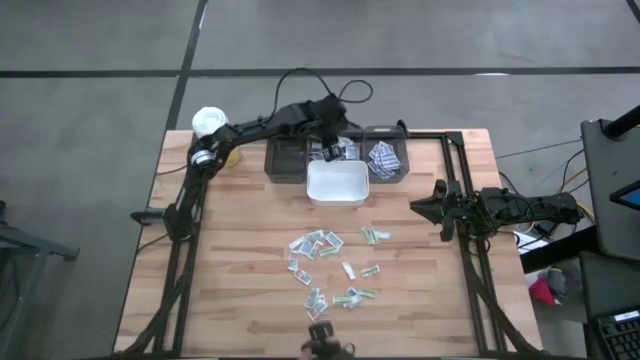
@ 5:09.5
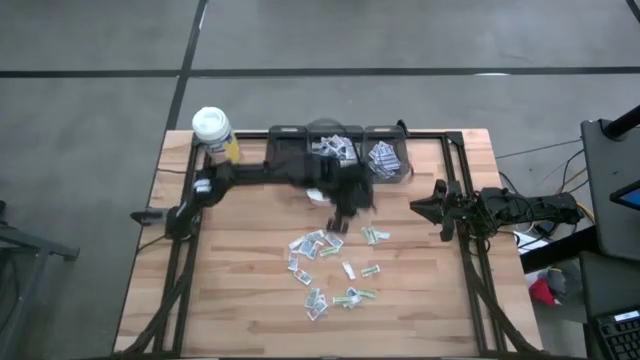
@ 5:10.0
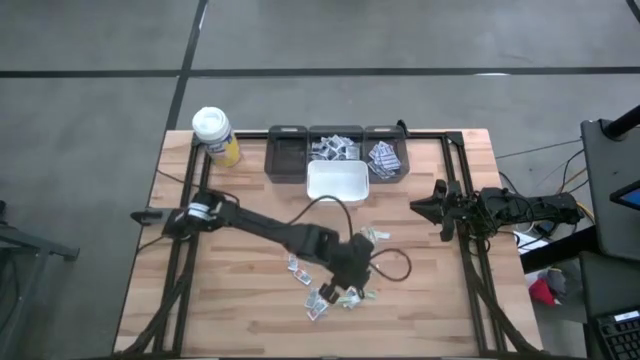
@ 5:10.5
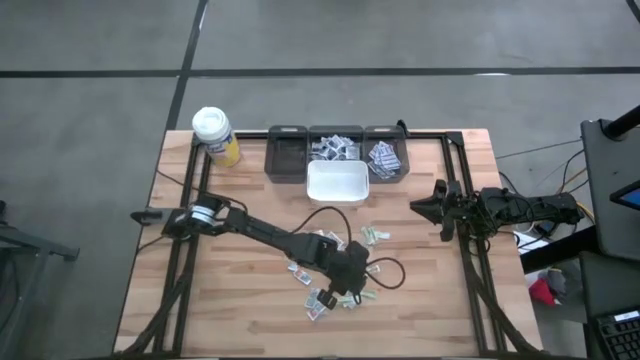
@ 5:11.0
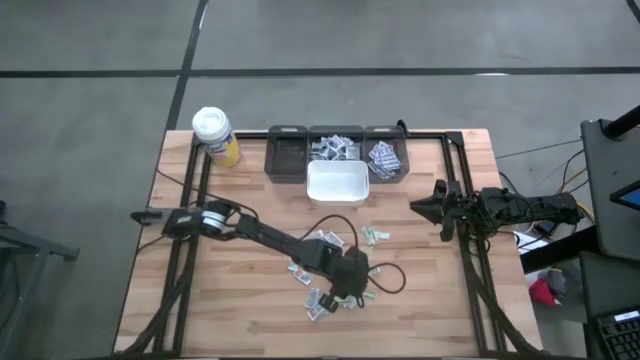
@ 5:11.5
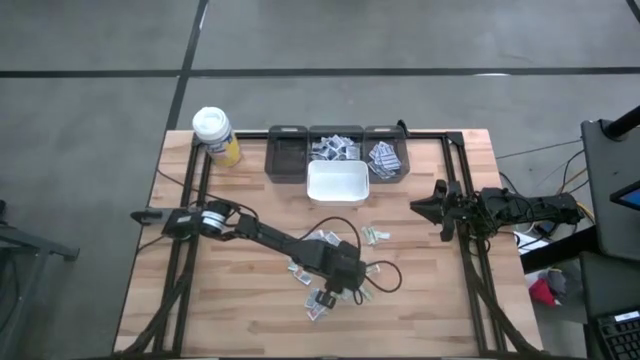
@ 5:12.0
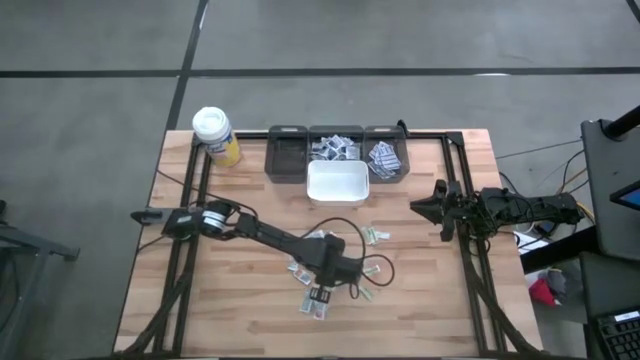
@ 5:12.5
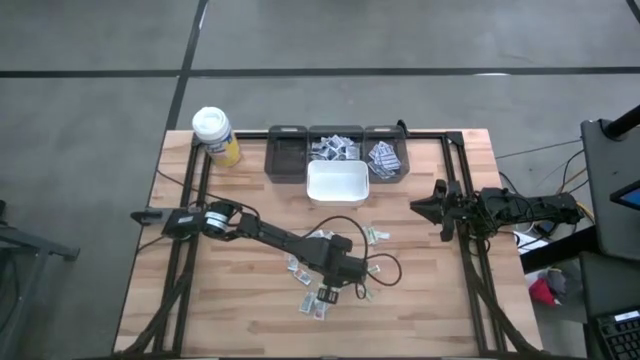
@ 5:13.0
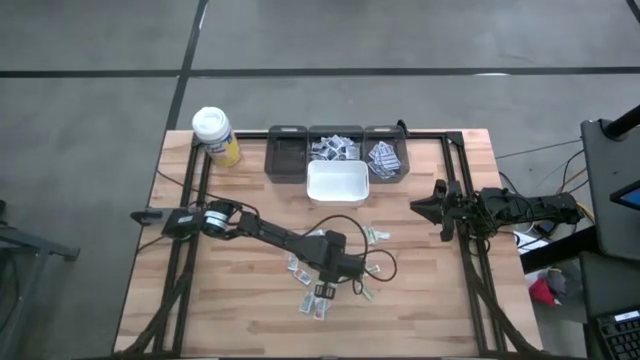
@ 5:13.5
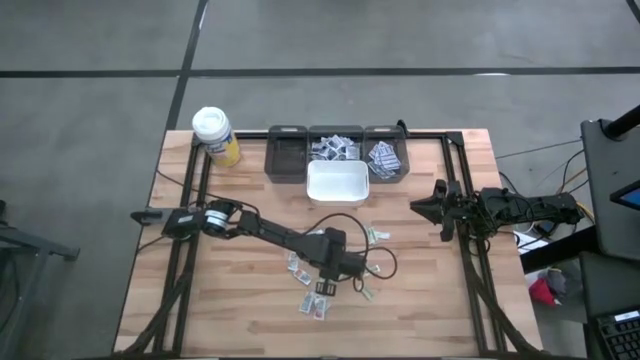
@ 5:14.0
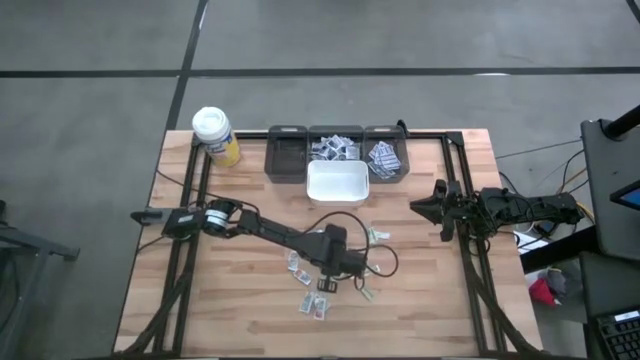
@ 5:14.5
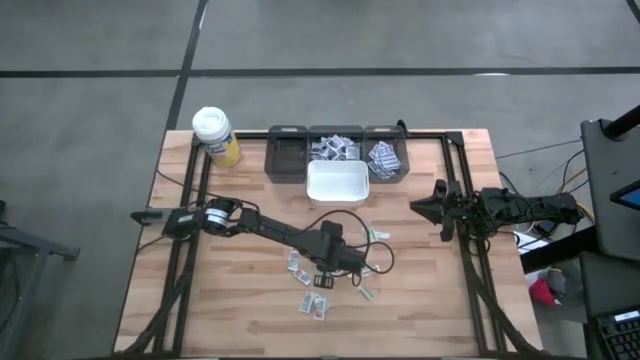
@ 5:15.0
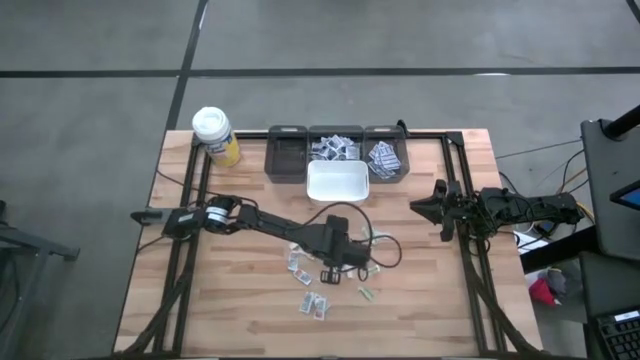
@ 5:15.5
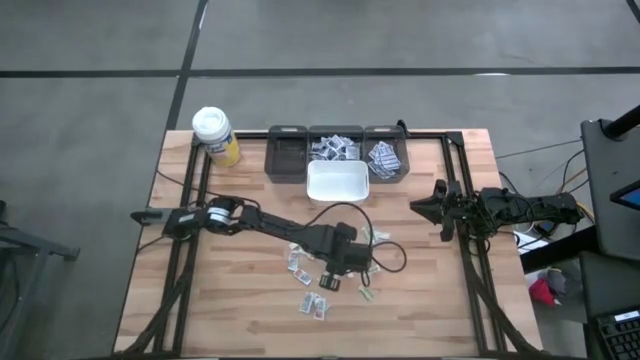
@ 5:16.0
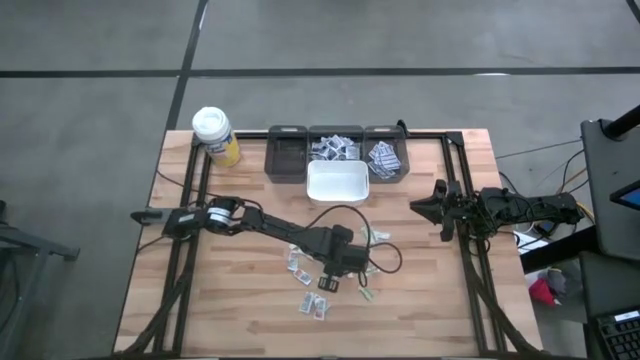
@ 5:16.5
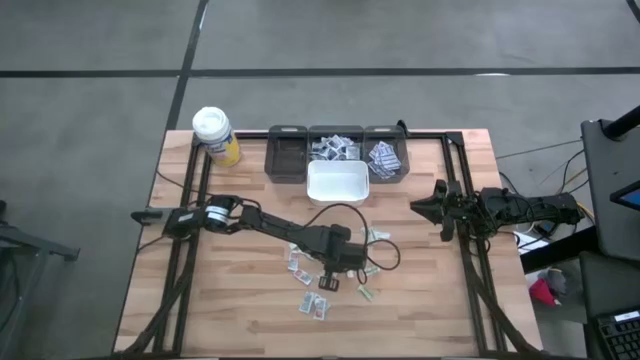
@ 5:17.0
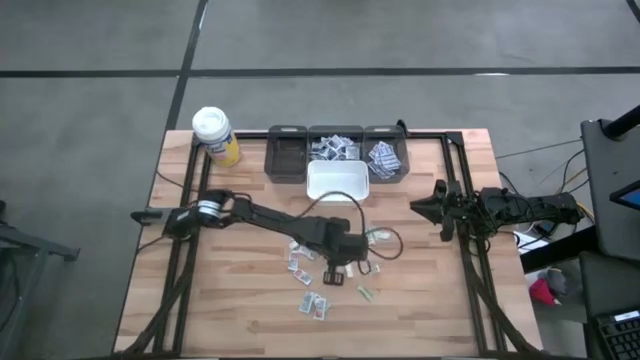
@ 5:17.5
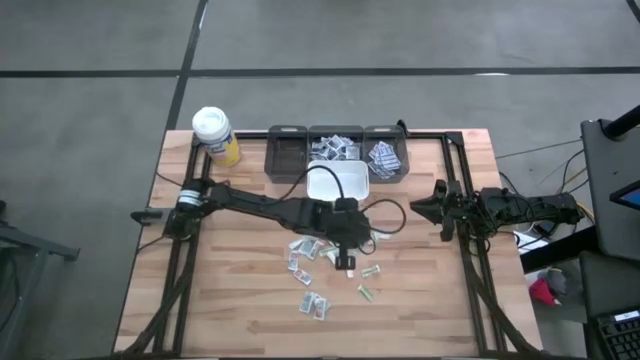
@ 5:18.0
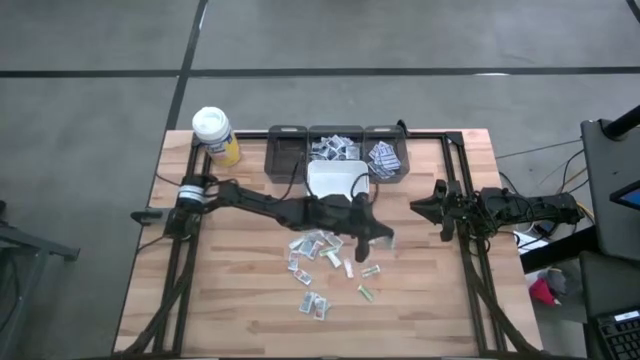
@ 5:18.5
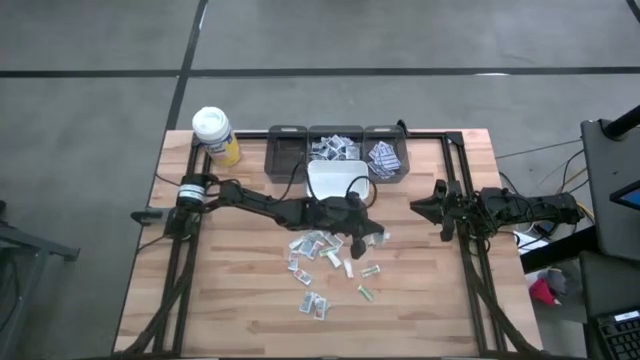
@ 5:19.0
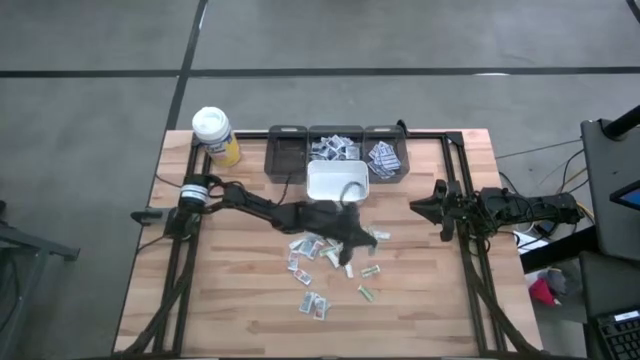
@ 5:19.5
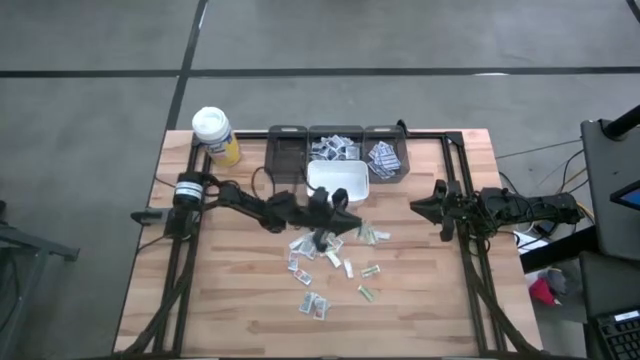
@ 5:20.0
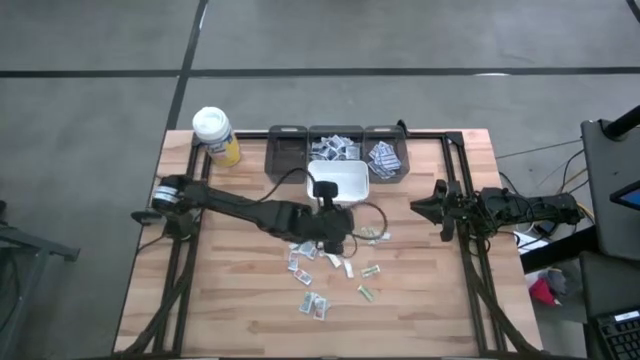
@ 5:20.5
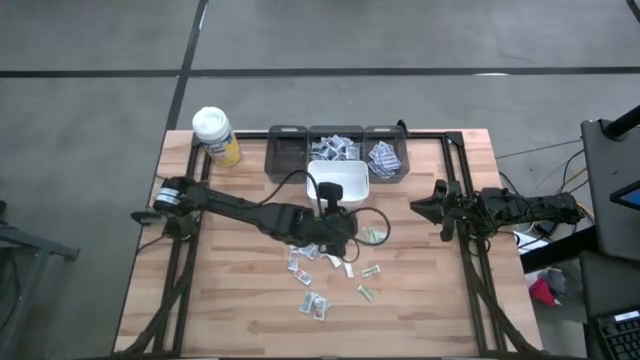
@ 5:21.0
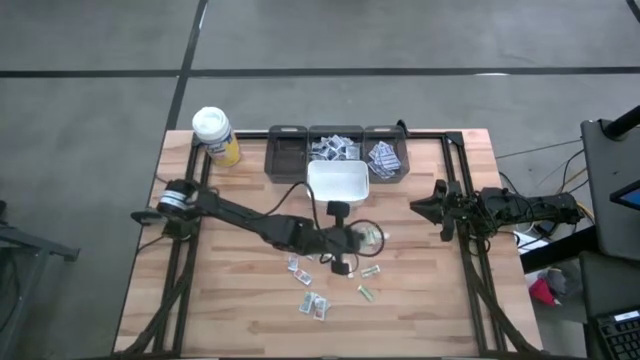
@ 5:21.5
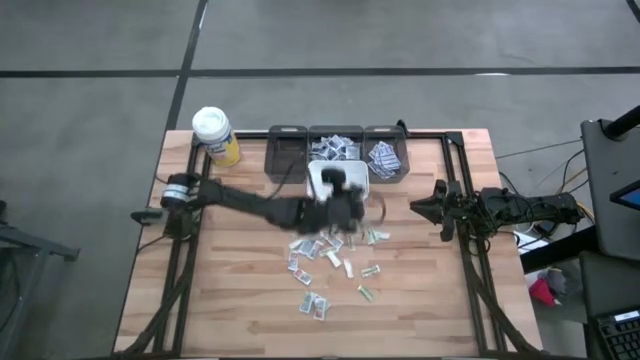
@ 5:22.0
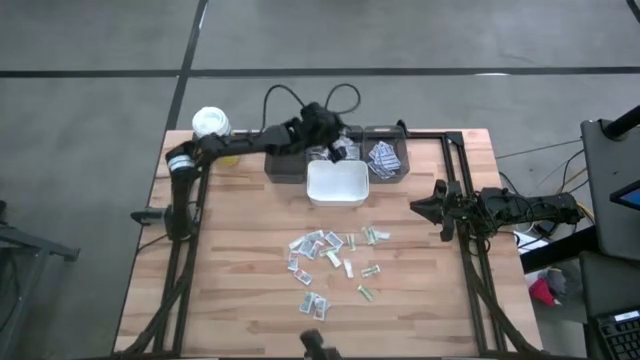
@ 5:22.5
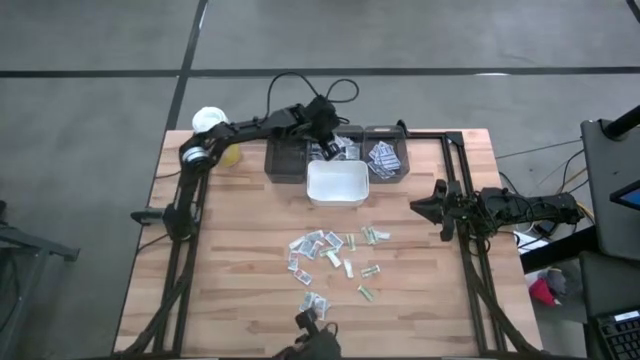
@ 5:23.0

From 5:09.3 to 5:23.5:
Task: Pick & Place First Aid Supplies
Put the bottom alcohol pad into the middle black bin

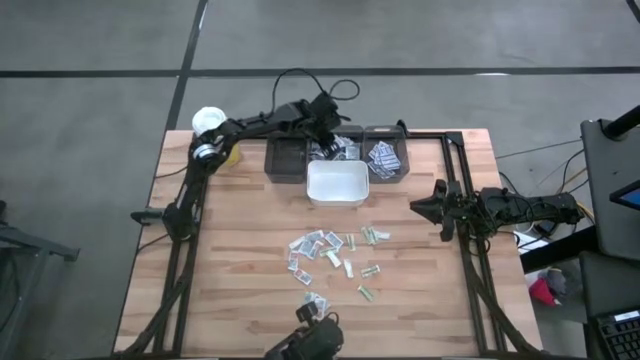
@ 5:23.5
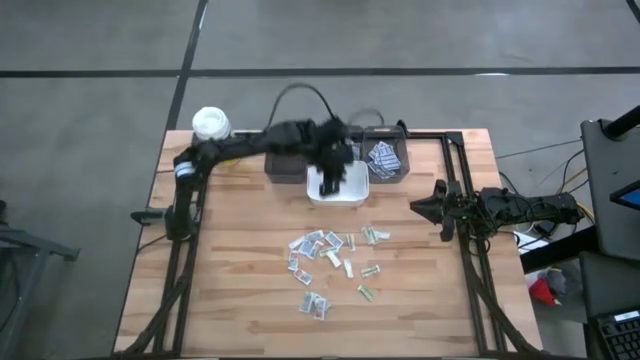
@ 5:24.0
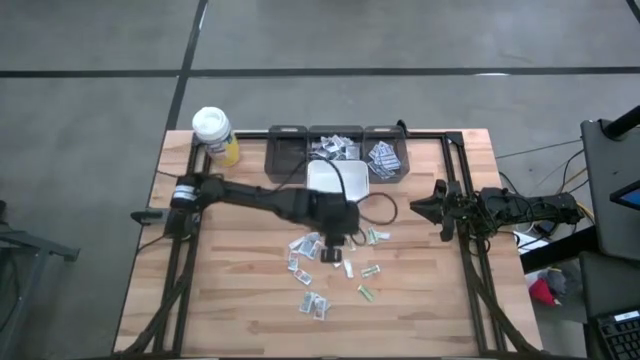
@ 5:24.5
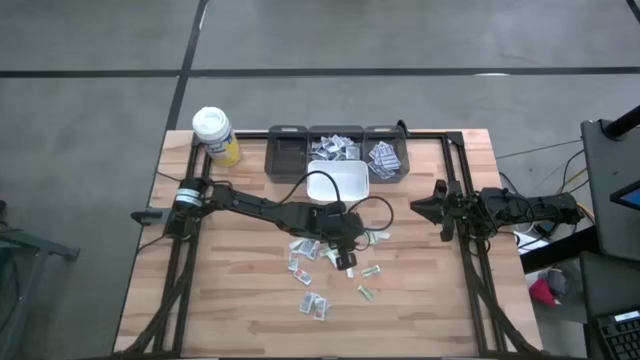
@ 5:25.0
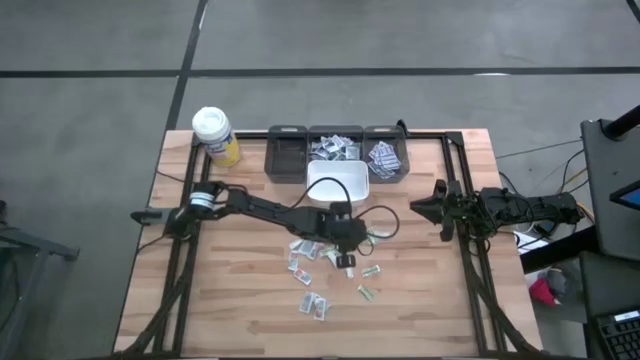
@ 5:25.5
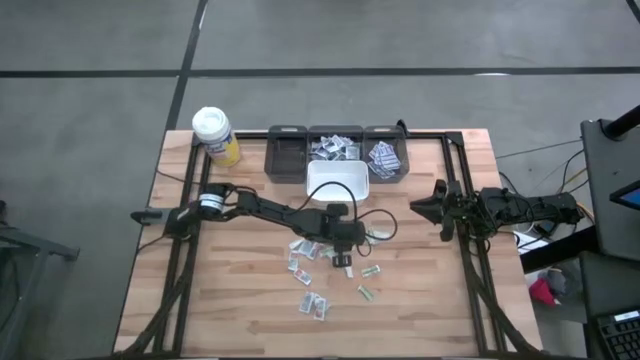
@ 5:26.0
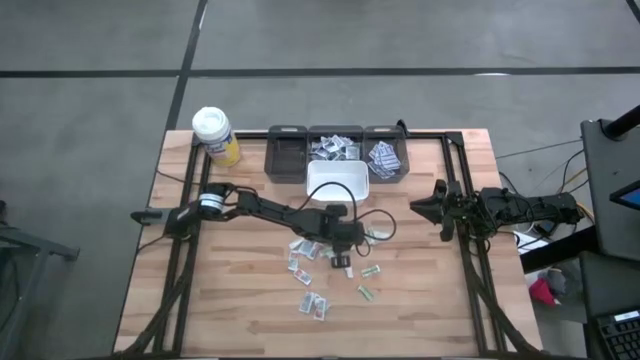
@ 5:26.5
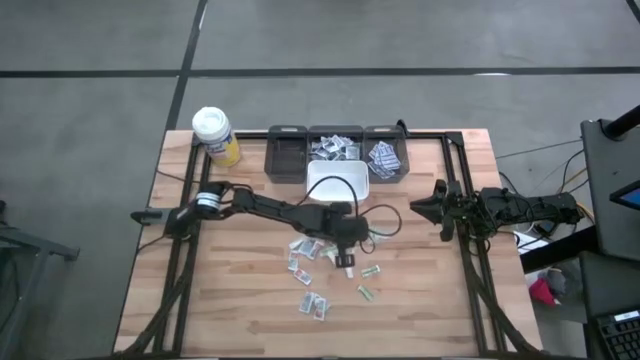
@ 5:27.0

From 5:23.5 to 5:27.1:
Put the green bandage pack into the left black bin

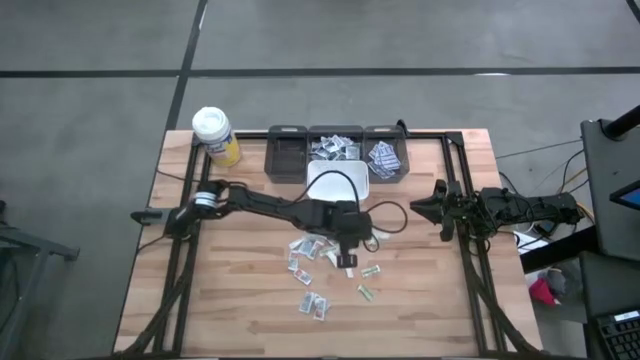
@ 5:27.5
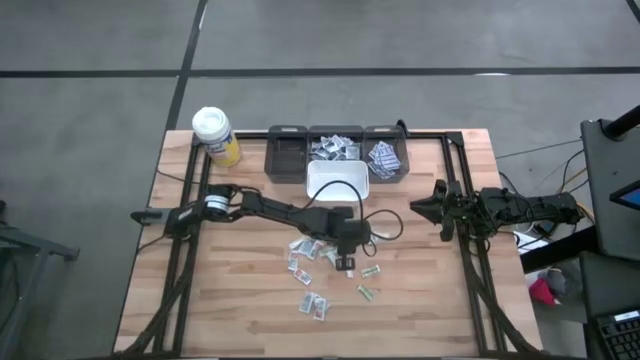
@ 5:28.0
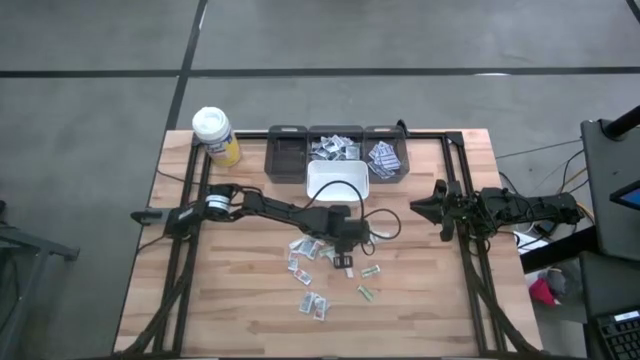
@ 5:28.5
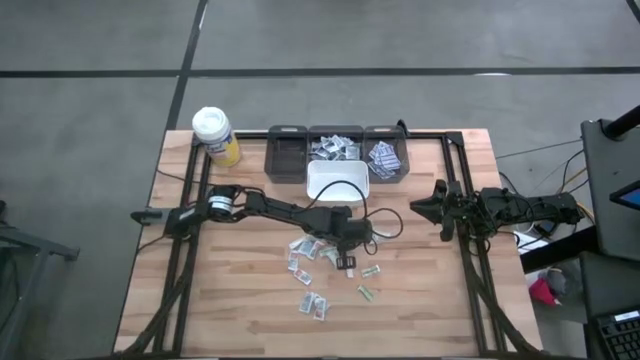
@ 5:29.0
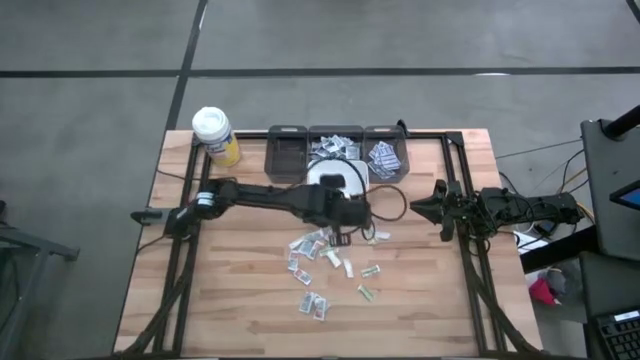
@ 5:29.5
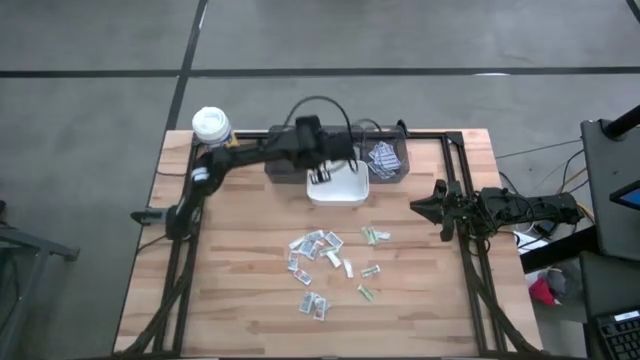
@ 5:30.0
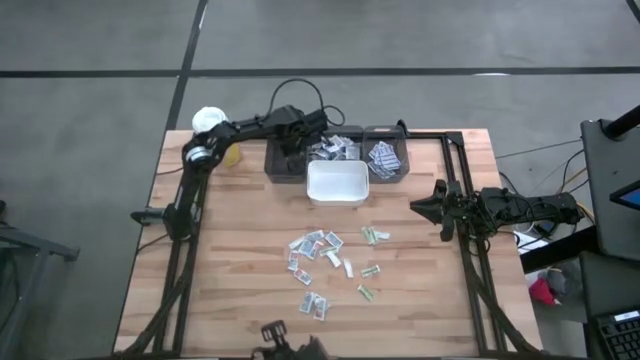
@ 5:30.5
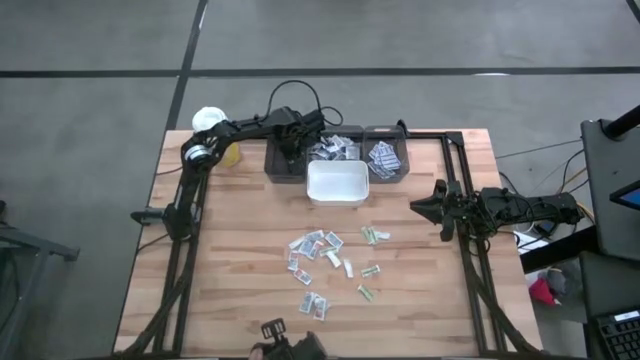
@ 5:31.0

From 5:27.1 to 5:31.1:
Put the green bandage pack into the left black bin
